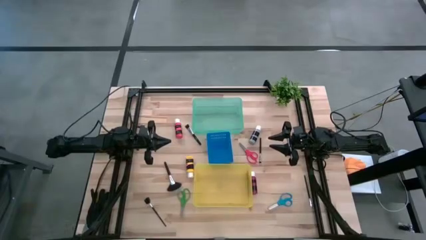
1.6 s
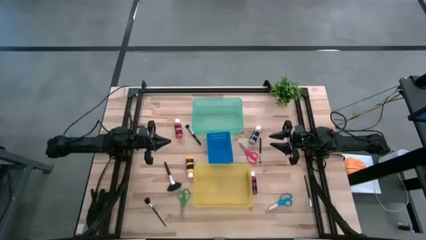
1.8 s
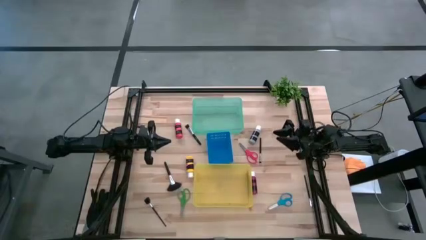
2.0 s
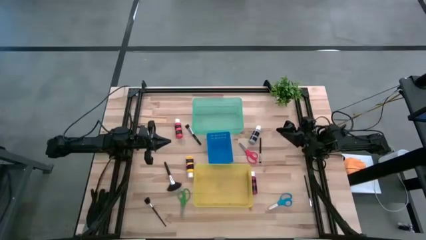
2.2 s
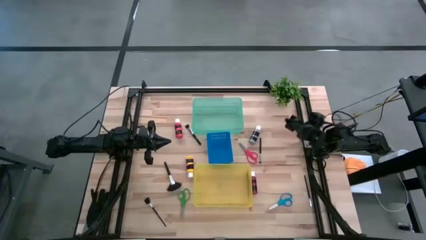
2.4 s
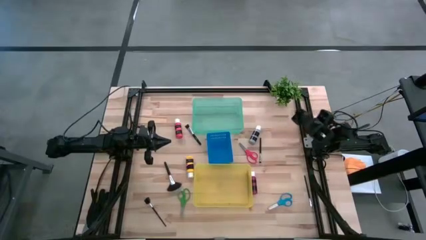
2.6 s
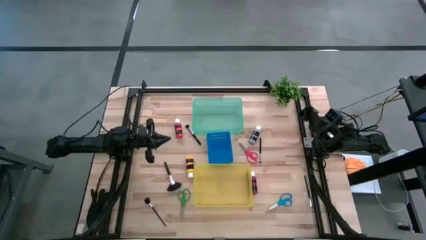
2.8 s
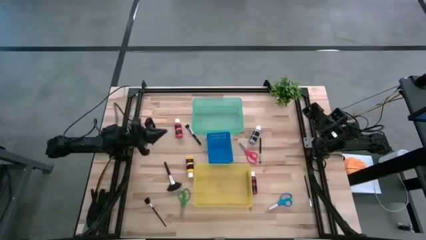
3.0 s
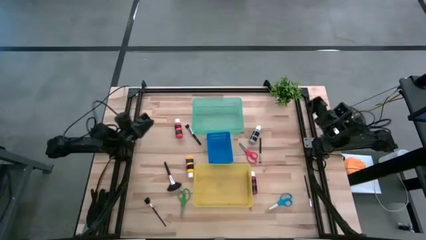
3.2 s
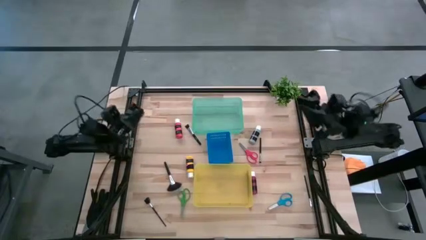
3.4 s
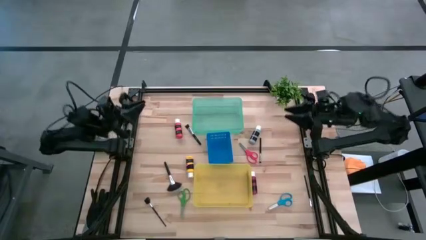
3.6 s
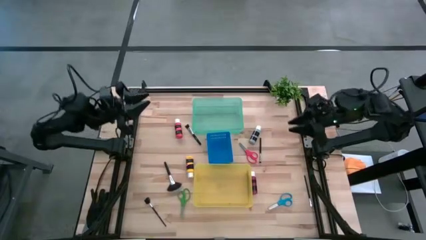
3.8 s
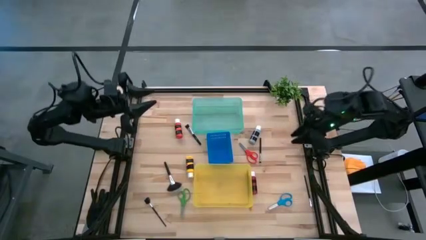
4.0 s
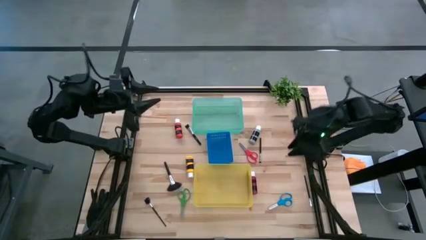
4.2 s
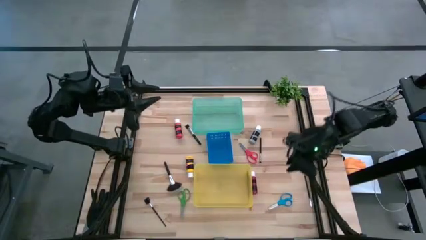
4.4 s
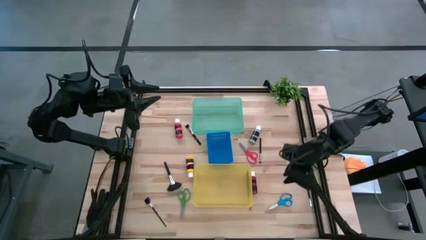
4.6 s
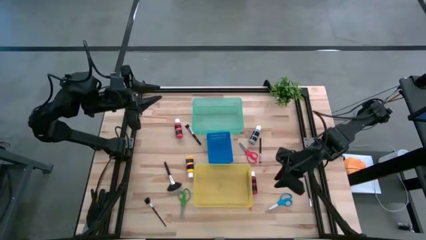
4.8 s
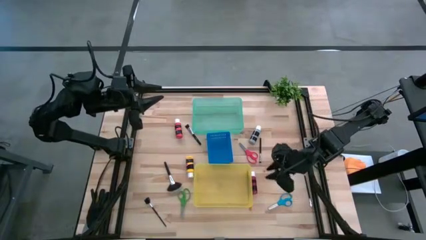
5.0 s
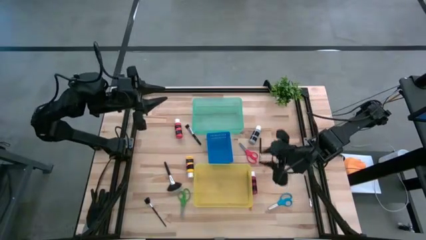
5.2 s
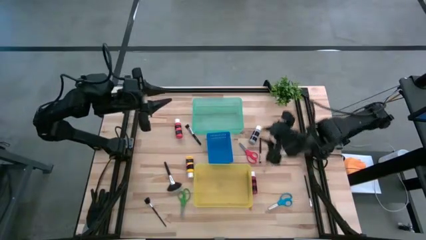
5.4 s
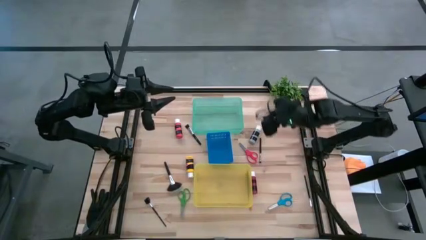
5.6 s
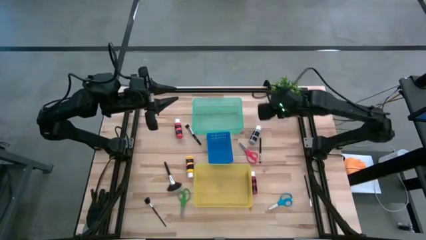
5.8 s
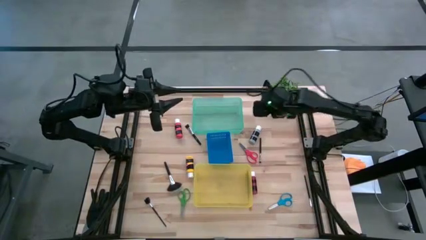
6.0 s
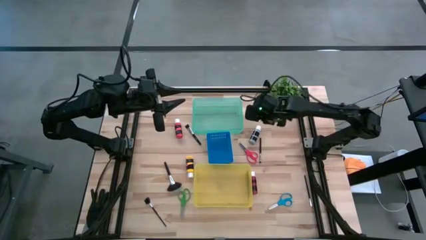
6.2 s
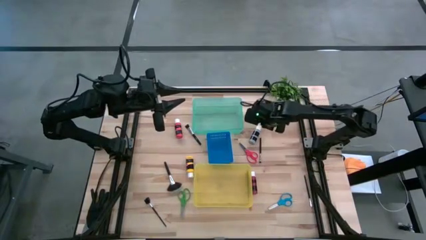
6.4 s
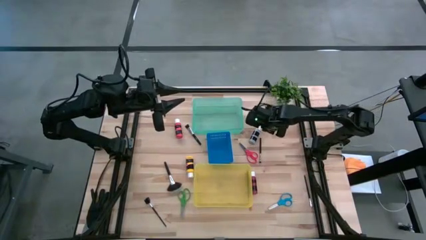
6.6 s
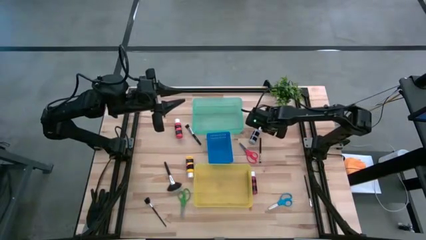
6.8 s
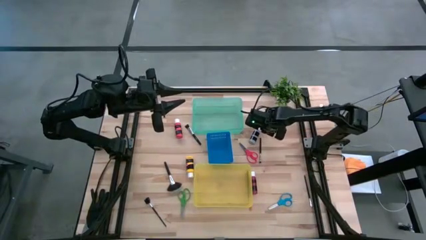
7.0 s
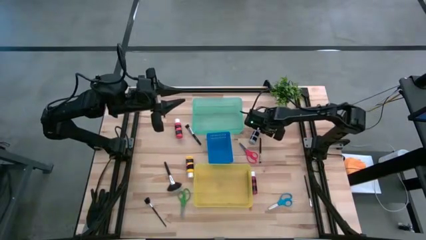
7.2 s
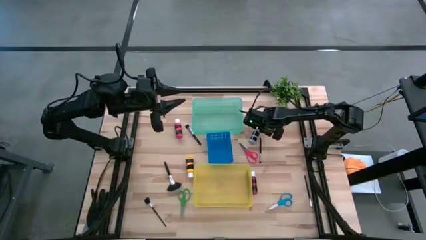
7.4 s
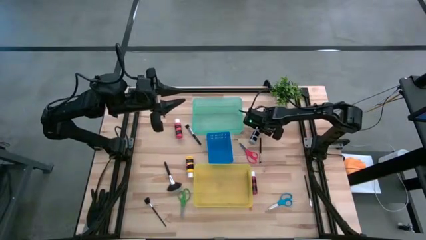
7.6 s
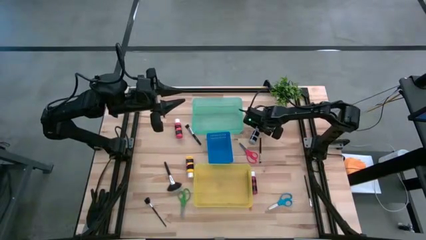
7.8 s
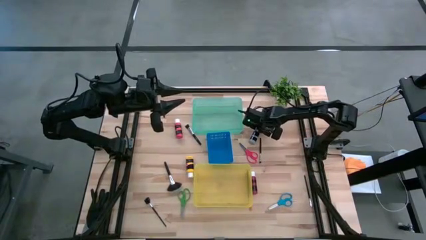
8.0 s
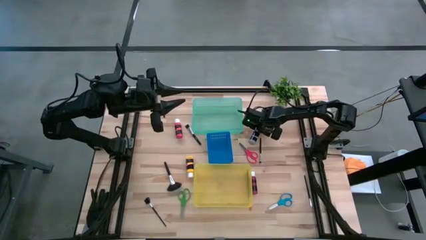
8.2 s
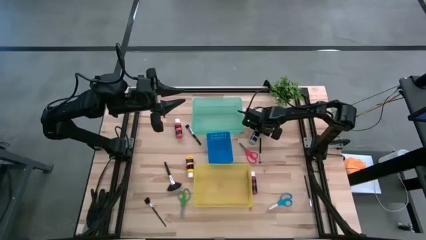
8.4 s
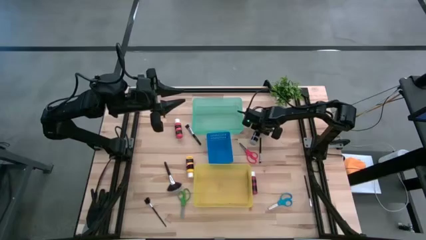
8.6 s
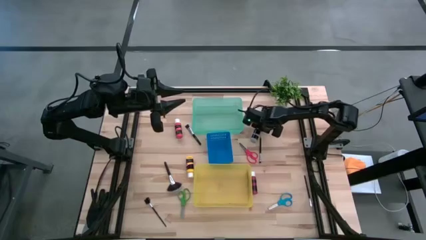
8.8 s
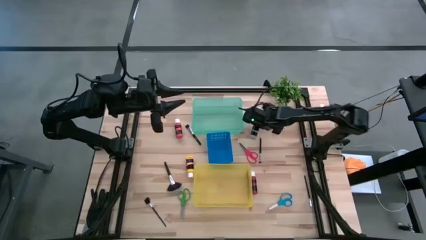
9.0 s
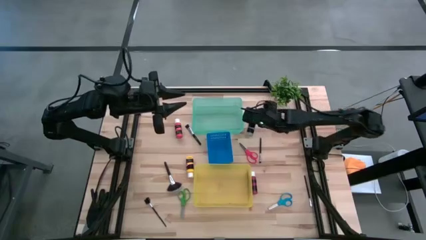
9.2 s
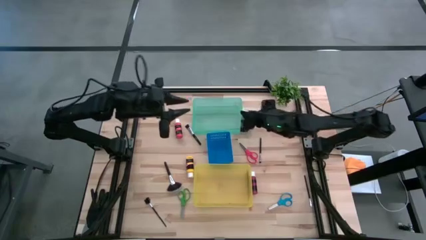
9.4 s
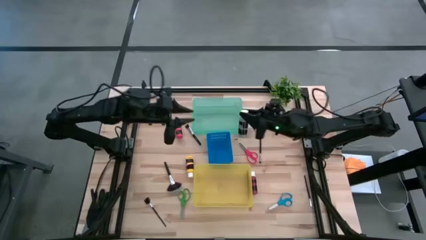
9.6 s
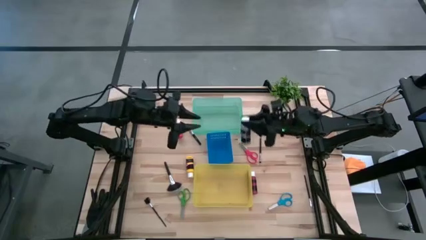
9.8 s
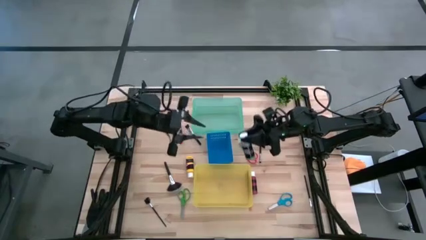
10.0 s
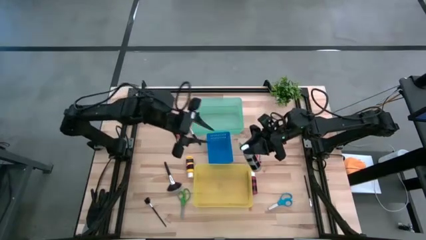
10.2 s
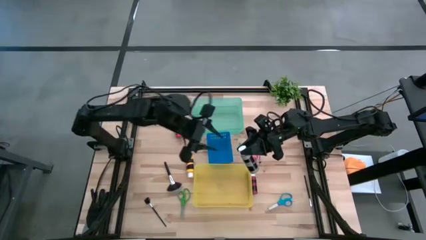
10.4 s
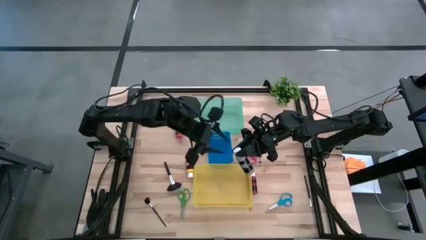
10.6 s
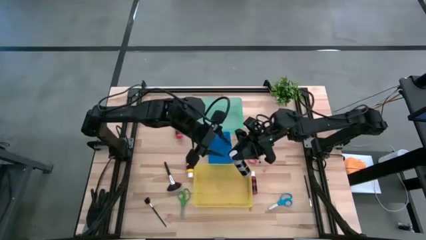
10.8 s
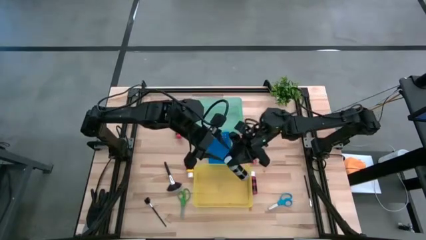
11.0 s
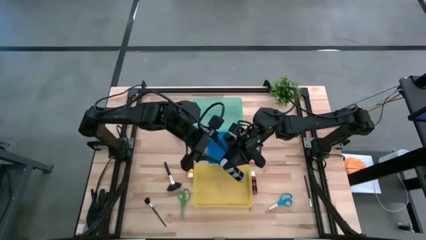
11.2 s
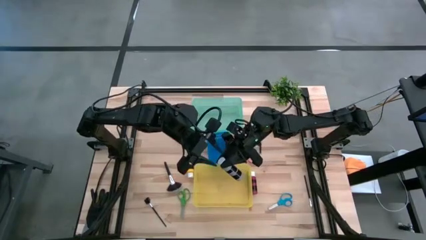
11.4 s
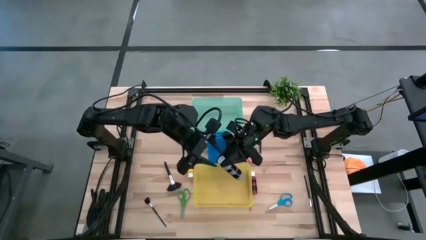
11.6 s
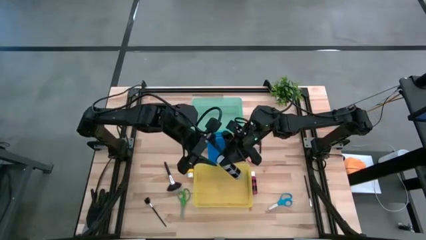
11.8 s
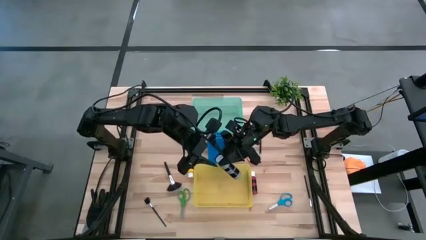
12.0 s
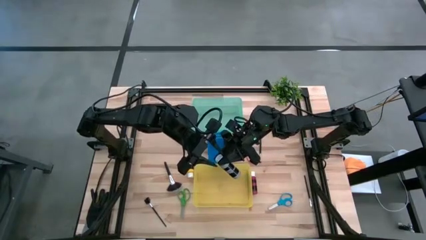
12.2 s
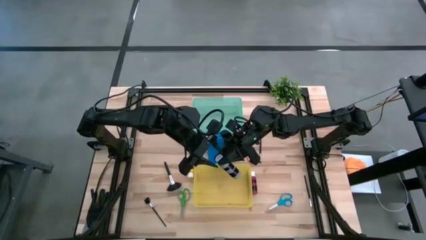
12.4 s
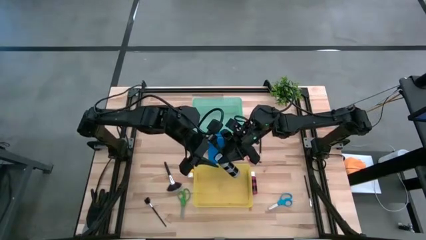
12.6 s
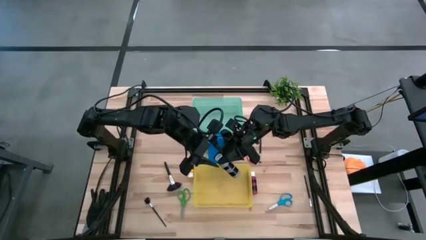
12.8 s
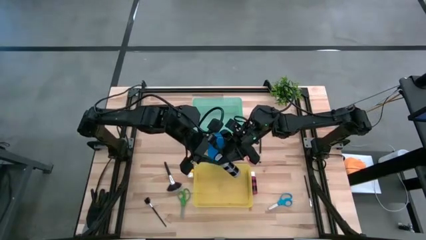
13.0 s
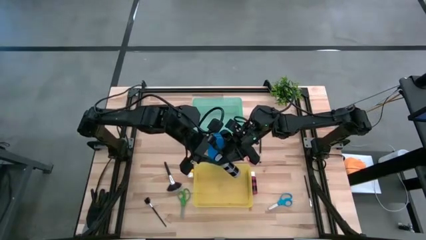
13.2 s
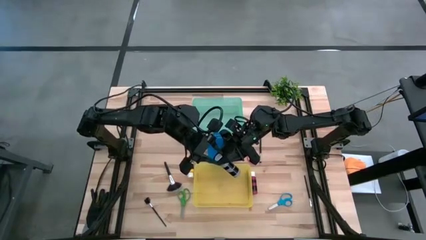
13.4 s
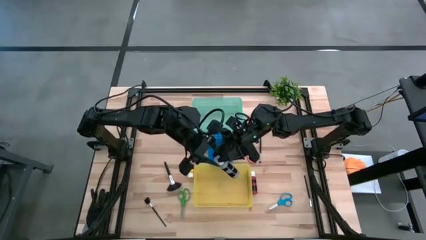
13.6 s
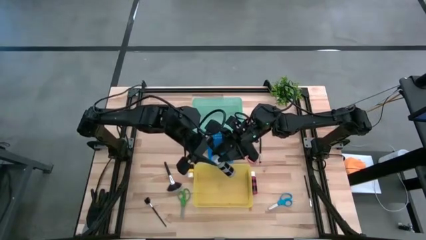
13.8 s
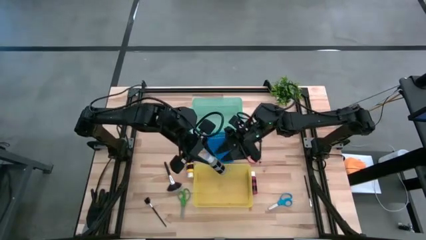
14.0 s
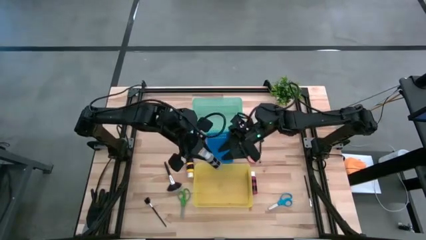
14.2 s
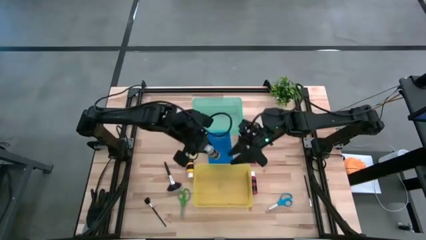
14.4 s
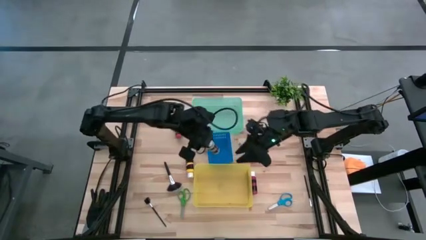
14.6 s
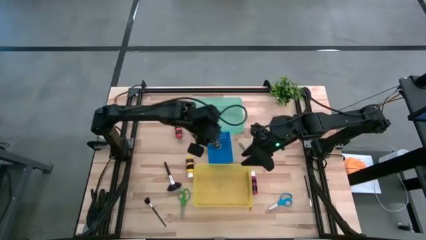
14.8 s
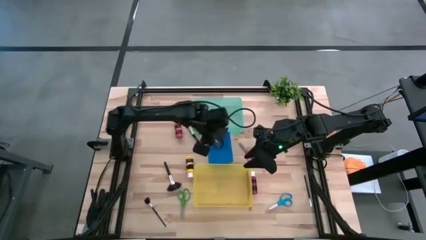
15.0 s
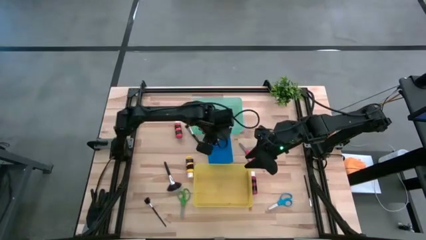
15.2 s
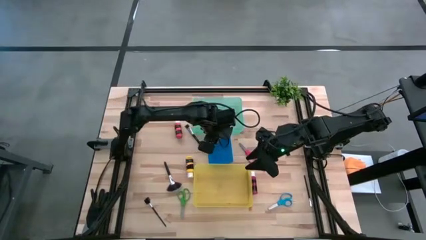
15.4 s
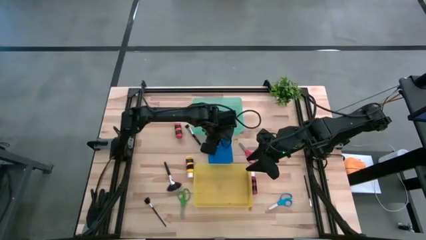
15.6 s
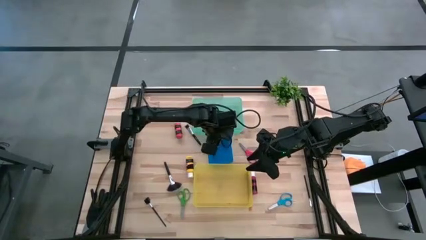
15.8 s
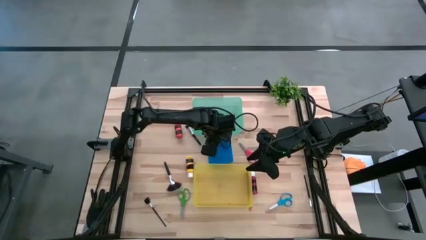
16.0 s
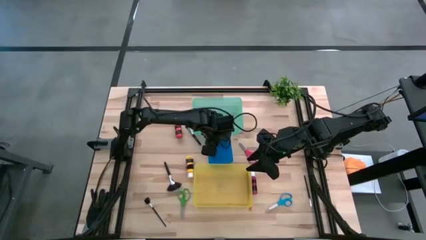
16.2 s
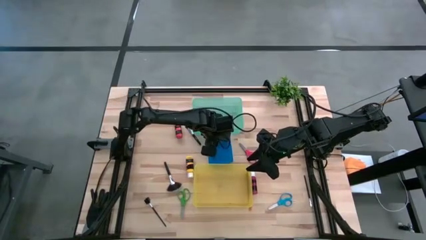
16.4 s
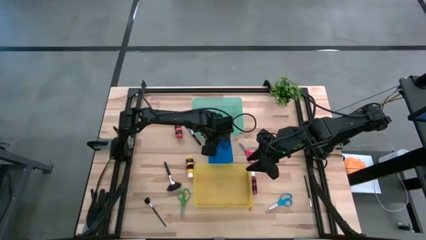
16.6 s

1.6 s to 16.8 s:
Task: Pick & Place Paint Supplies
Put the gray paint bottle into the blue bin
